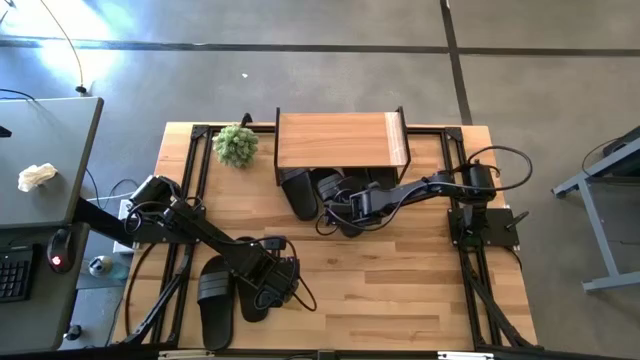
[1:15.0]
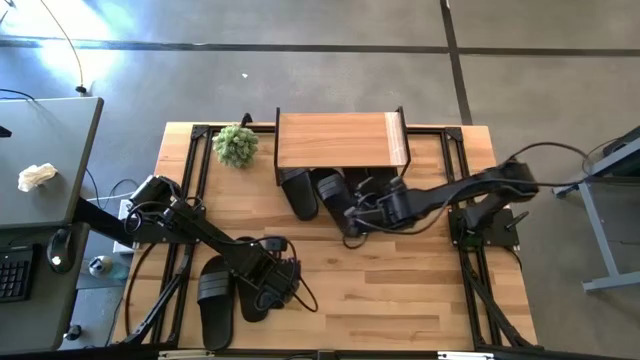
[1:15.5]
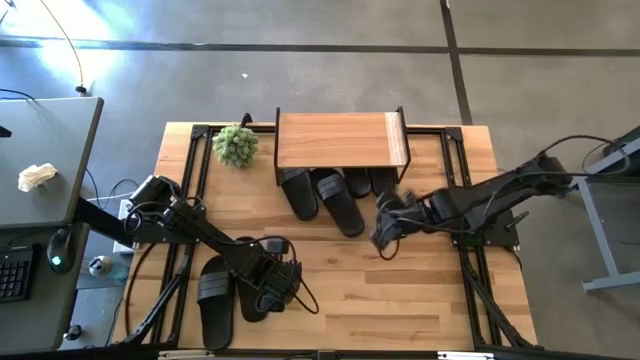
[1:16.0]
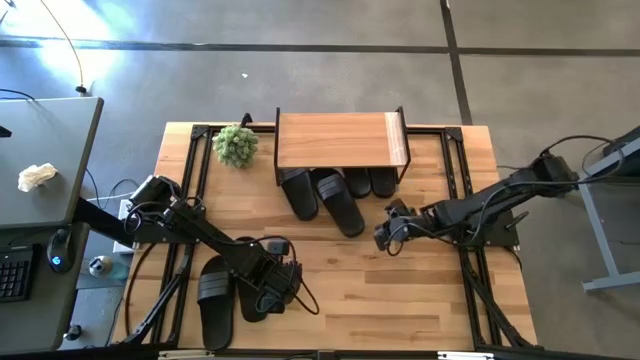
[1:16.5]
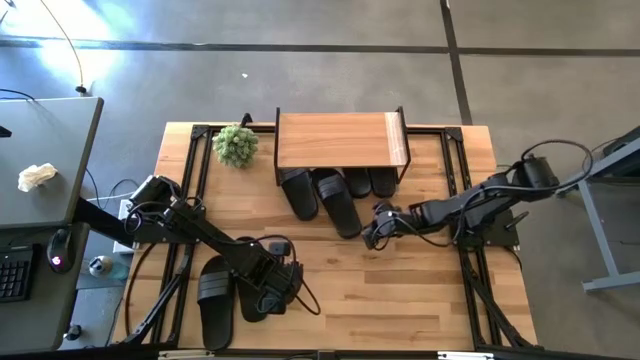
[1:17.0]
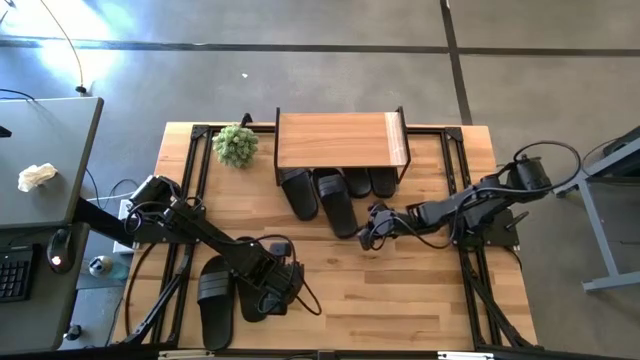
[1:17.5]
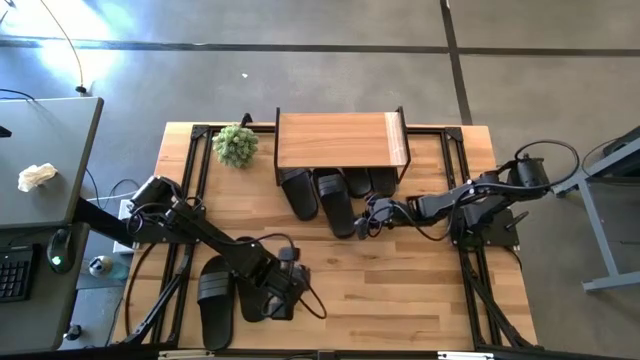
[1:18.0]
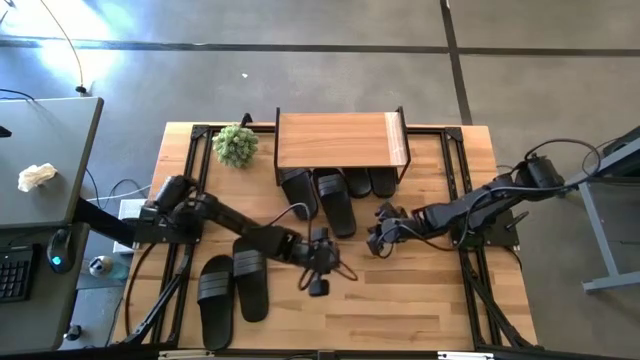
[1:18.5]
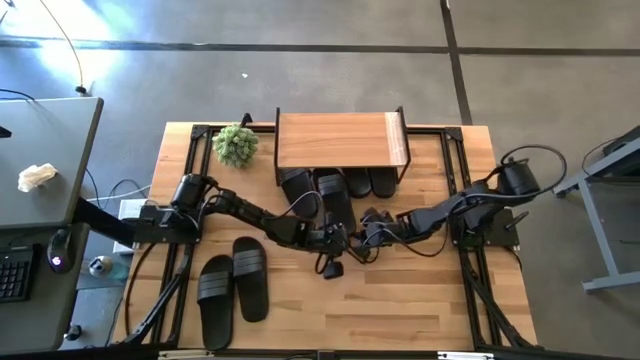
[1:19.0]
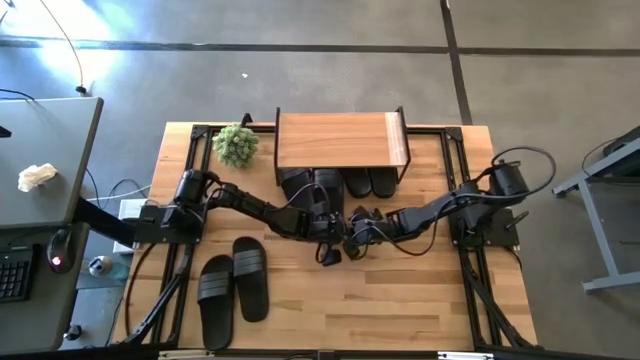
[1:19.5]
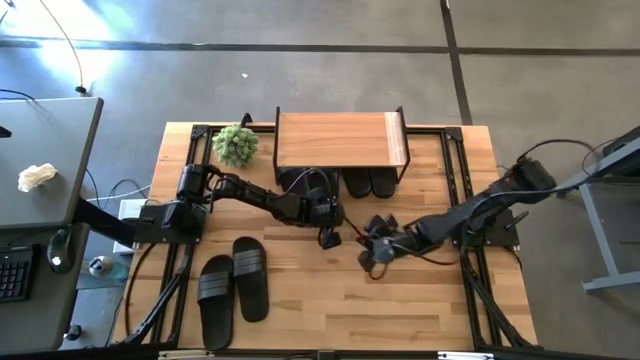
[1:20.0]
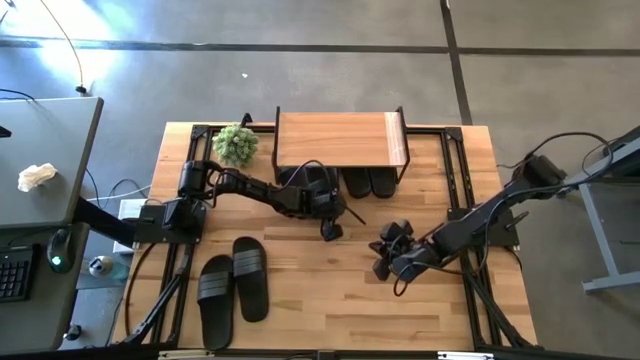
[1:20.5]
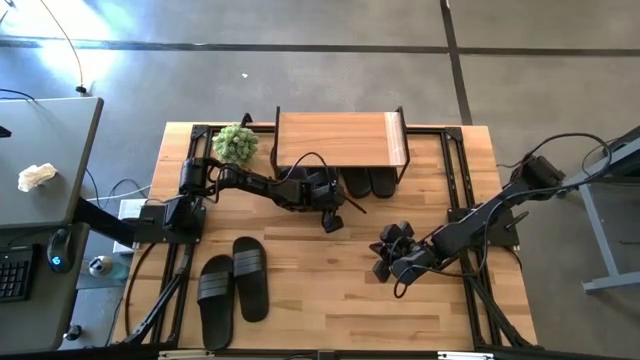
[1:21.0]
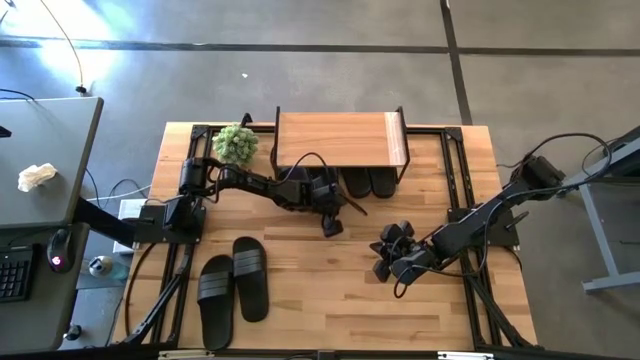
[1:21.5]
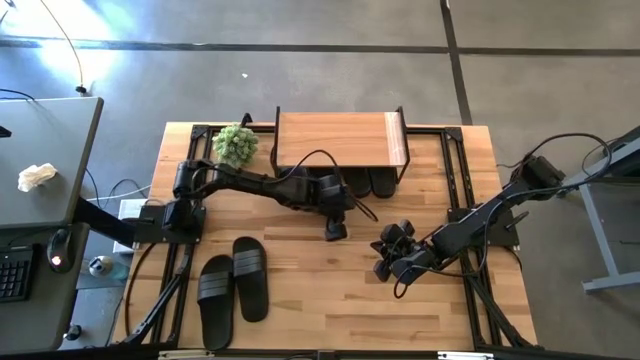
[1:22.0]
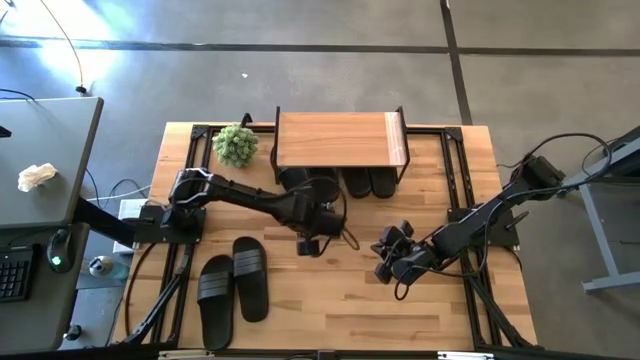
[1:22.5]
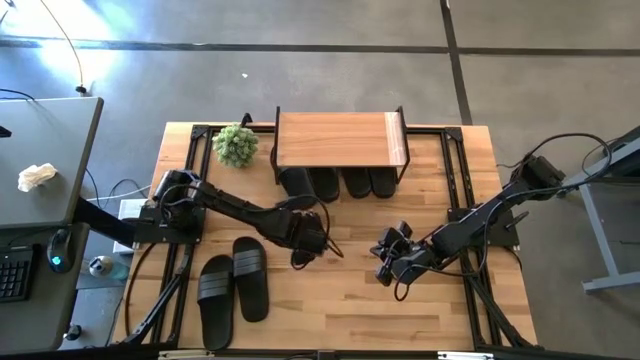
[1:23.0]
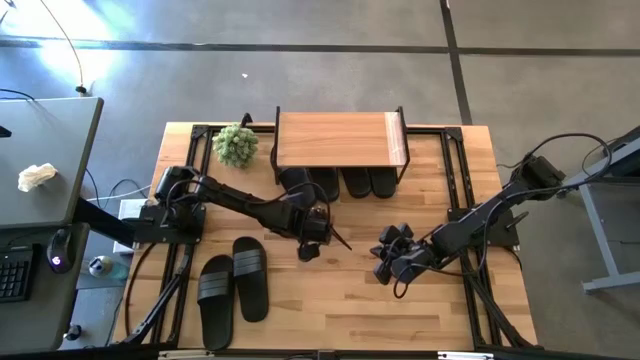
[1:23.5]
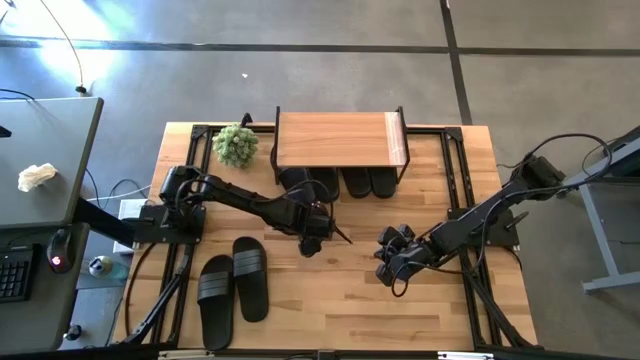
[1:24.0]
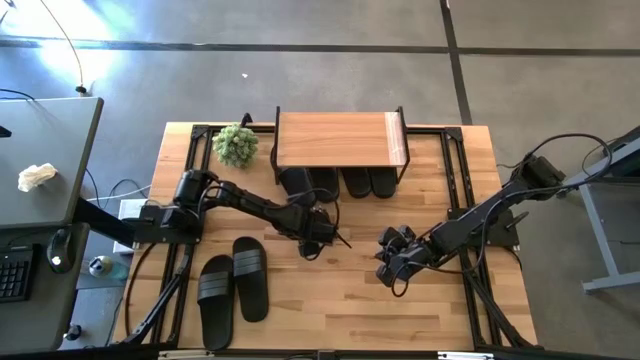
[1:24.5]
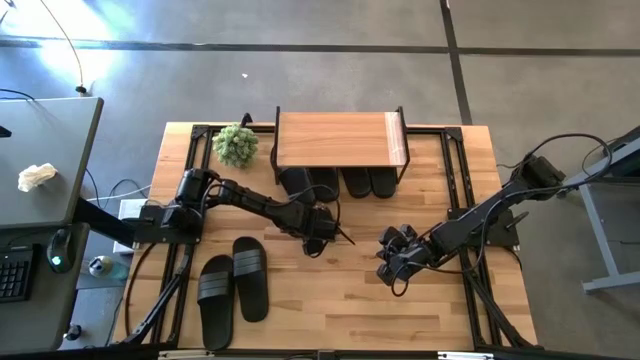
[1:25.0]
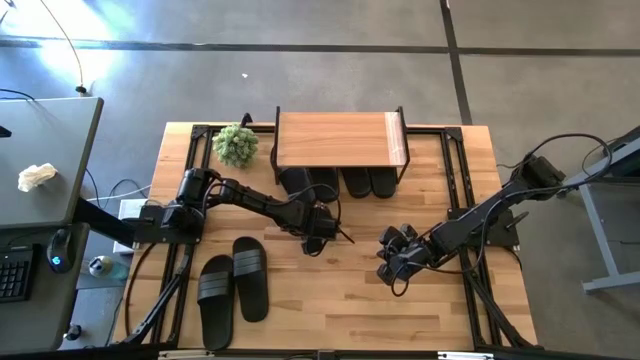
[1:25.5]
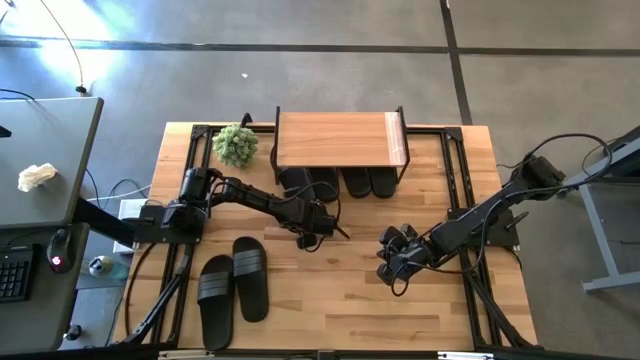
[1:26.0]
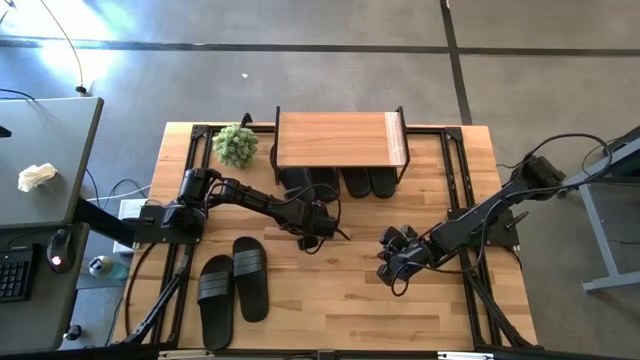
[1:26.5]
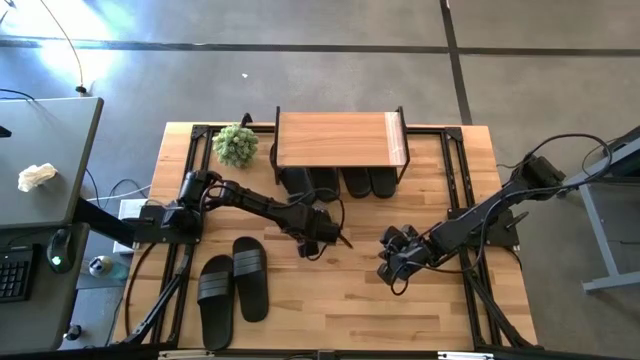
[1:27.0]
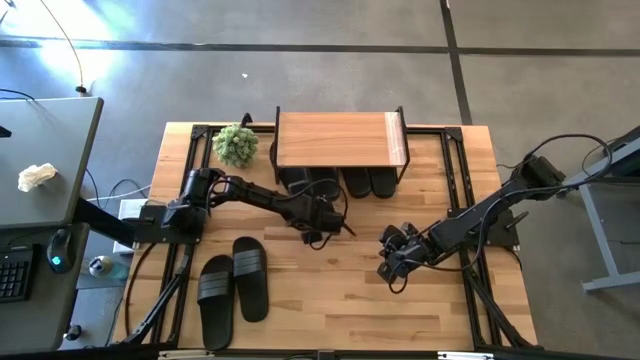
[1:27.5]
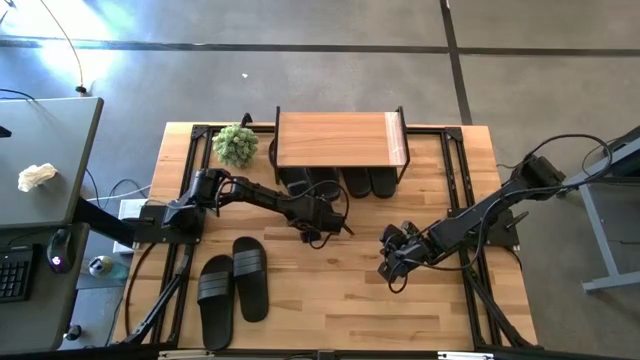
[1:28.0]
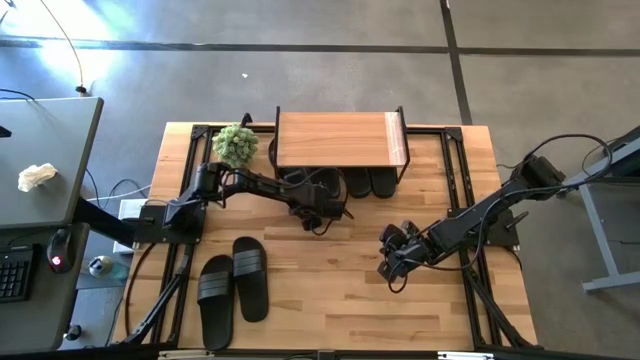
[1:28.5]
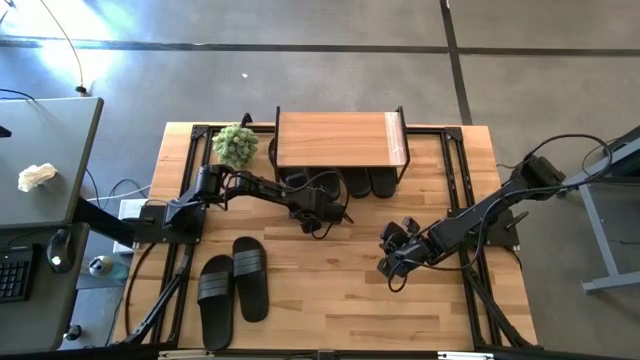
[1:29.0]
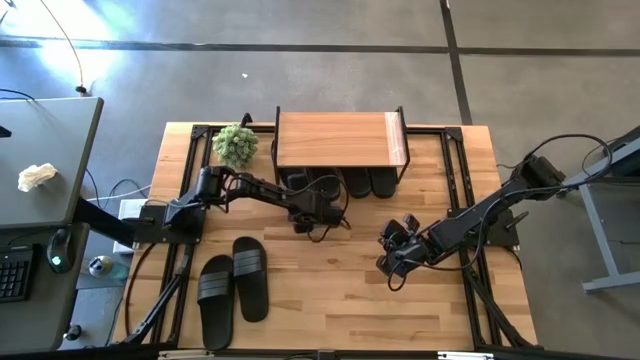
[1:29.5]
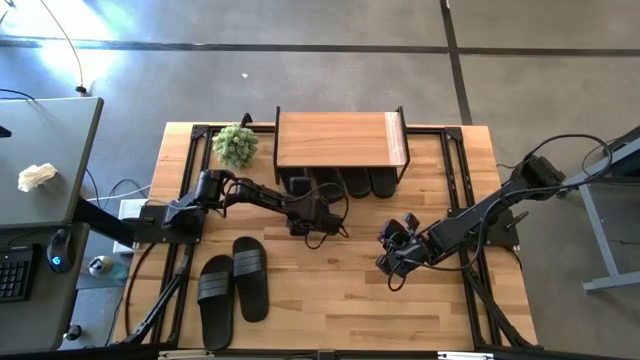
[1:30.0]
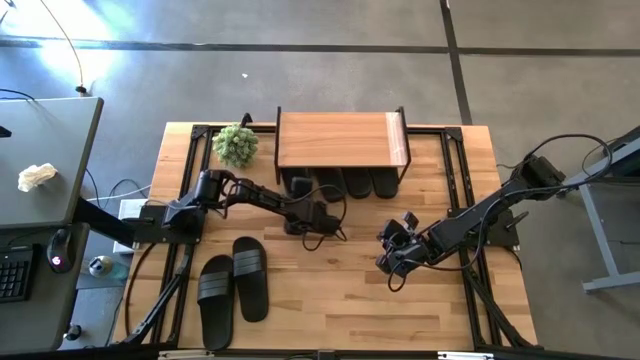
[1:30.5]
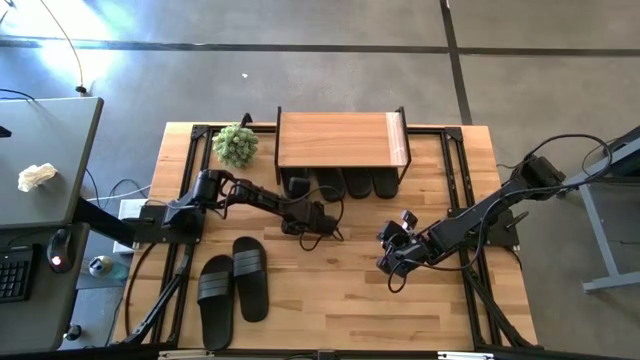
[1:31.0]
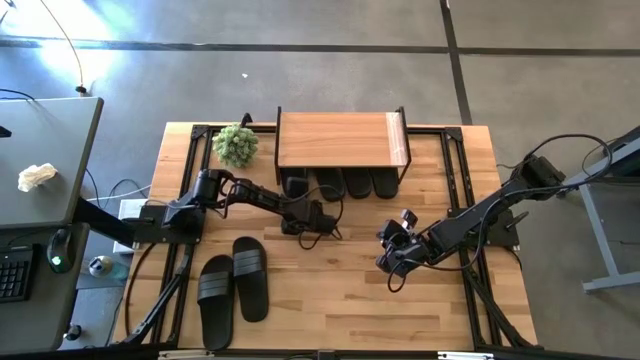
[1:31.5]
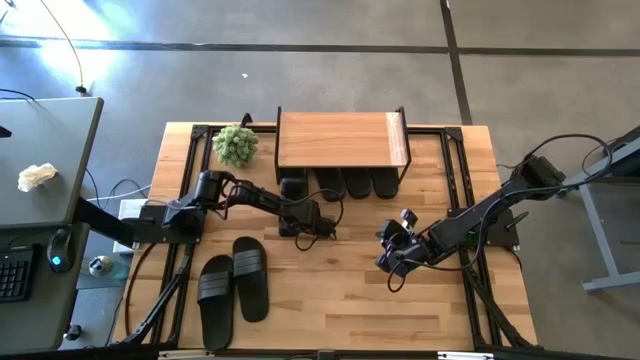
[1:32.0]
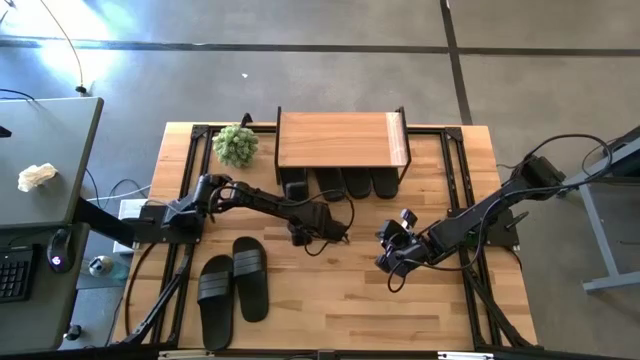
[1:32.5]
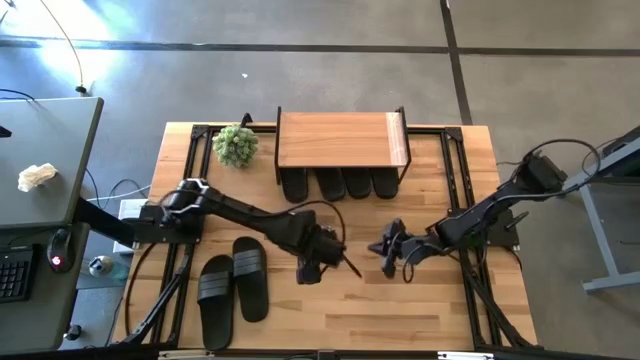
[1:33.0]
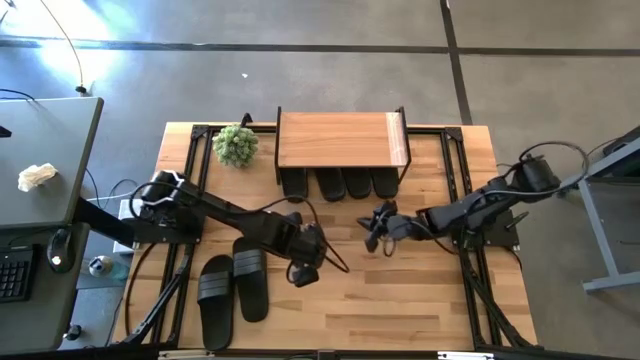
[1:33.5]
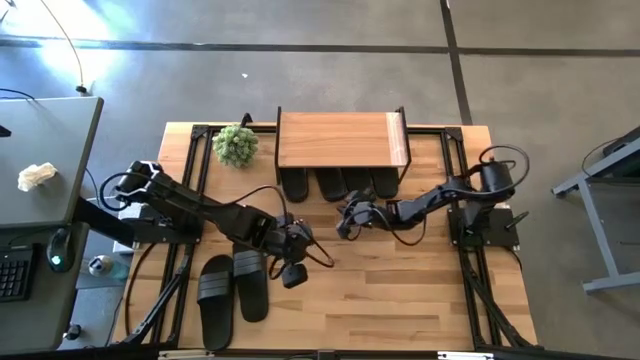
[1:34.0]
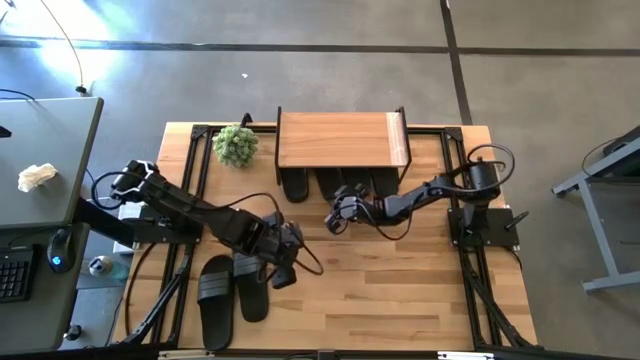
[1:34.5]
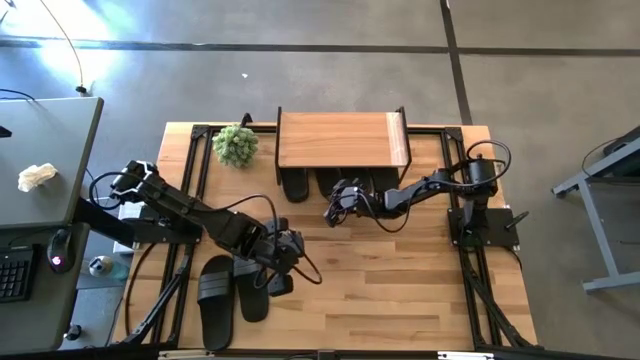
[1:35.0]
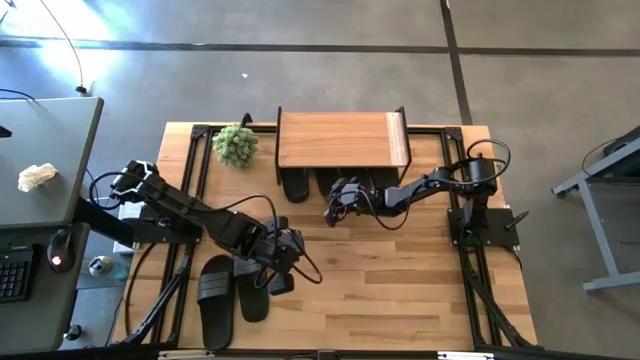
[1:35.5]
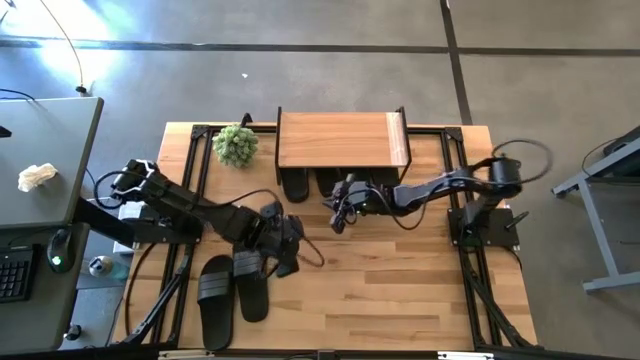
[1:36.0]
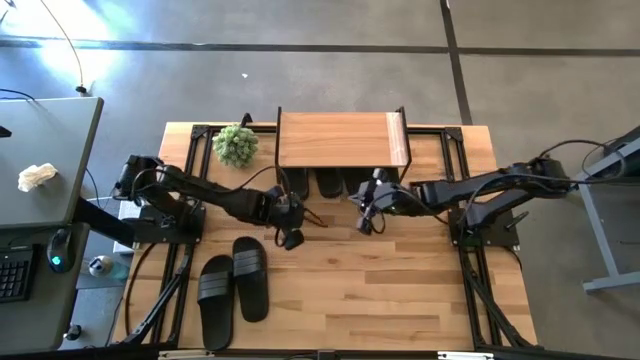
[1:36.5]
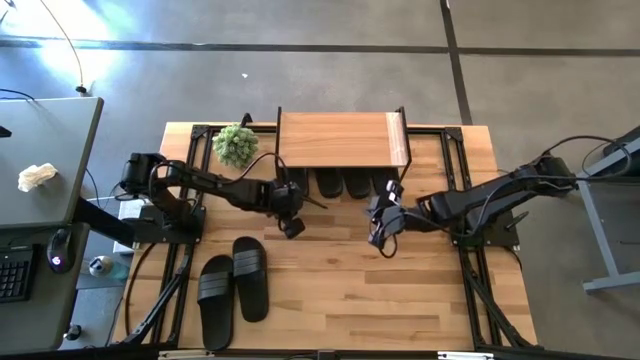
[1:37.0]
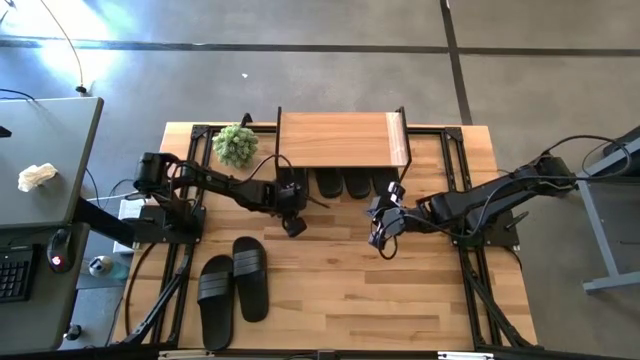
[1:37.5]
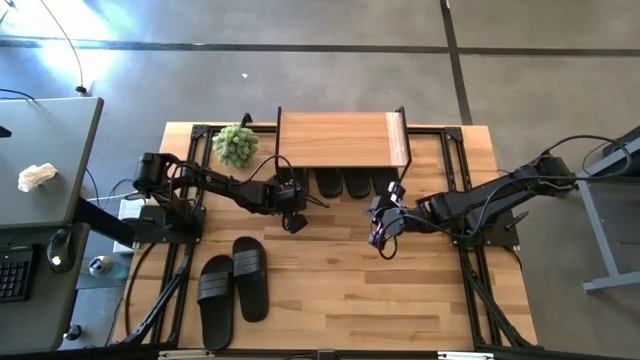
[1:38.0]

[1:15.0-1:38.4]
Task: Pick and place slides into the shelf
Adjust the black slippers under the shelf
